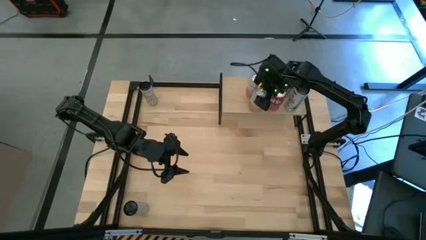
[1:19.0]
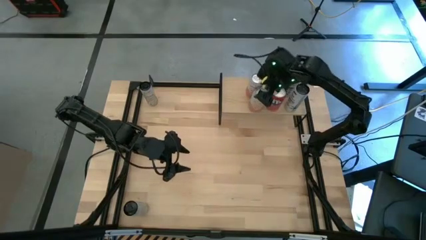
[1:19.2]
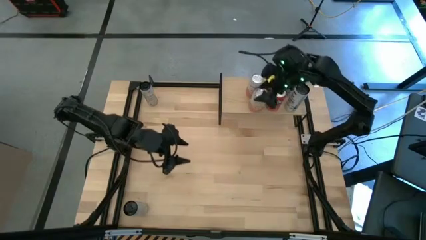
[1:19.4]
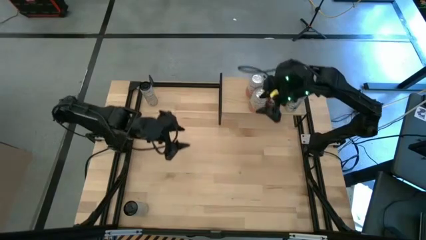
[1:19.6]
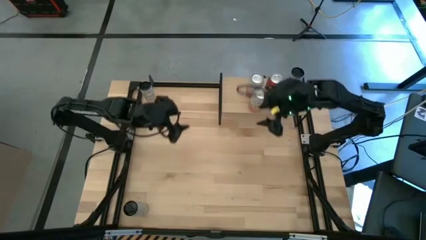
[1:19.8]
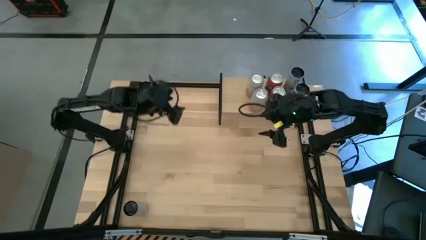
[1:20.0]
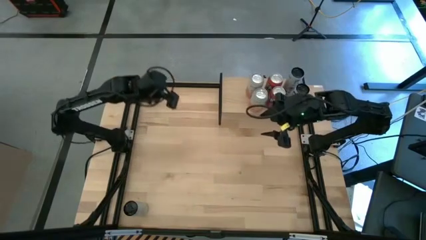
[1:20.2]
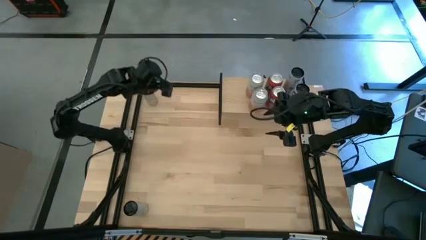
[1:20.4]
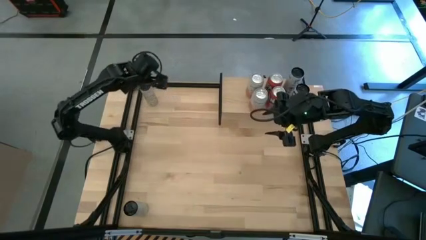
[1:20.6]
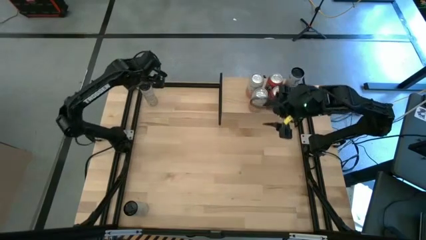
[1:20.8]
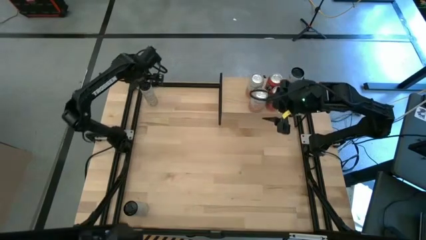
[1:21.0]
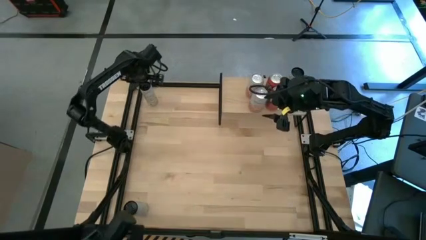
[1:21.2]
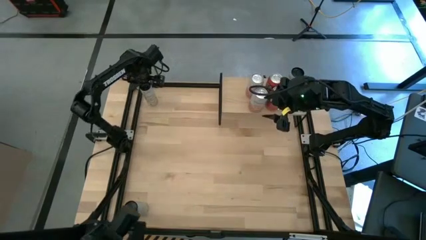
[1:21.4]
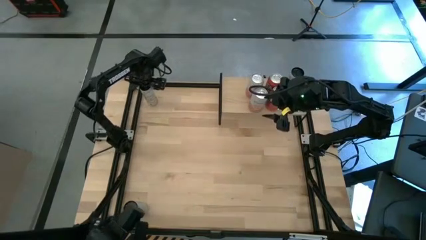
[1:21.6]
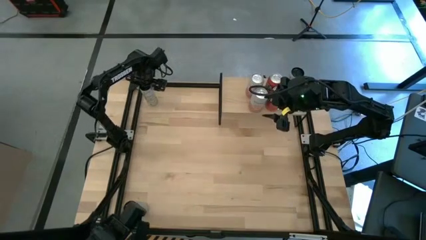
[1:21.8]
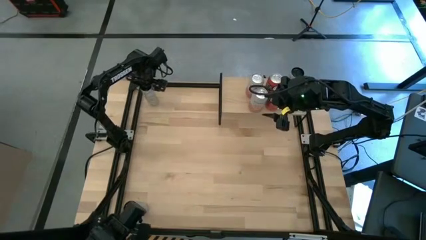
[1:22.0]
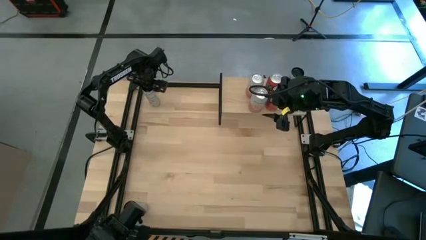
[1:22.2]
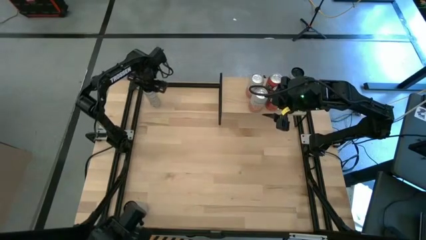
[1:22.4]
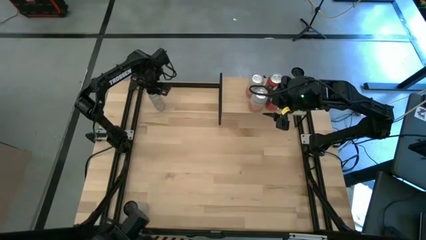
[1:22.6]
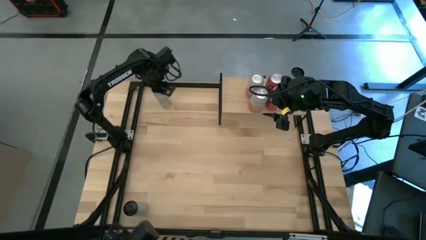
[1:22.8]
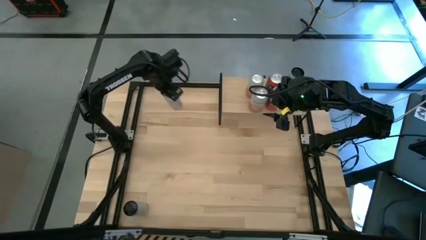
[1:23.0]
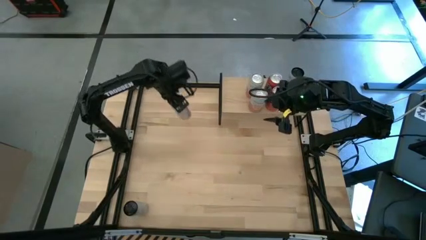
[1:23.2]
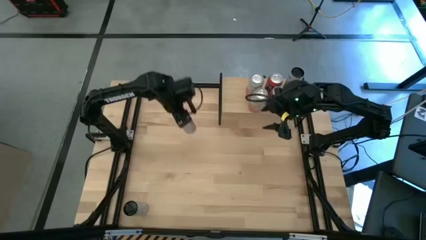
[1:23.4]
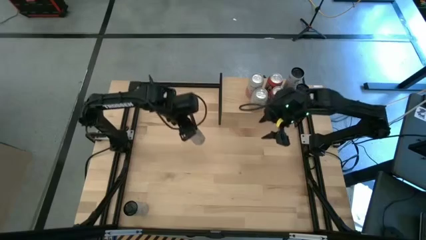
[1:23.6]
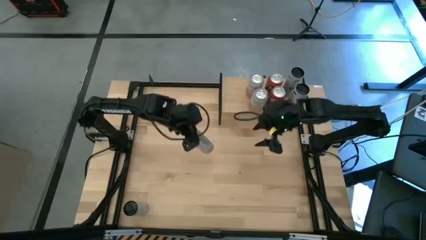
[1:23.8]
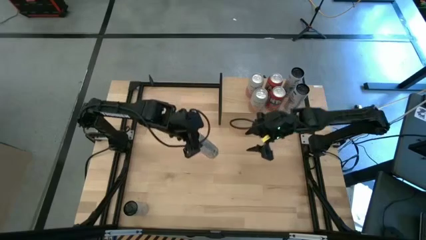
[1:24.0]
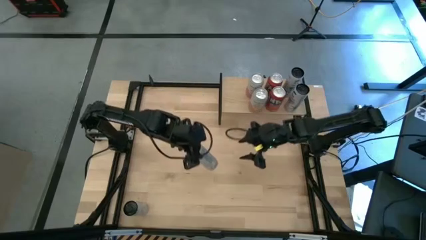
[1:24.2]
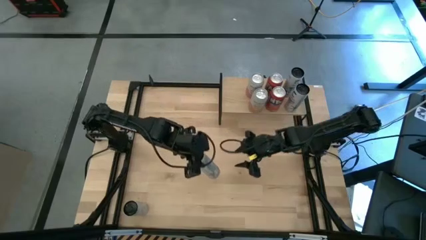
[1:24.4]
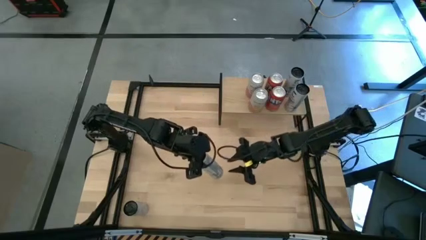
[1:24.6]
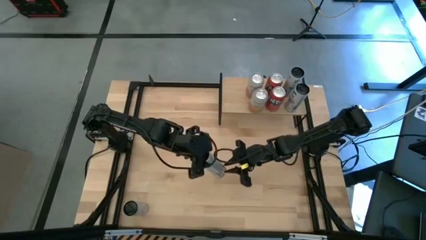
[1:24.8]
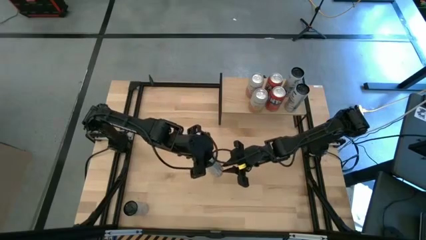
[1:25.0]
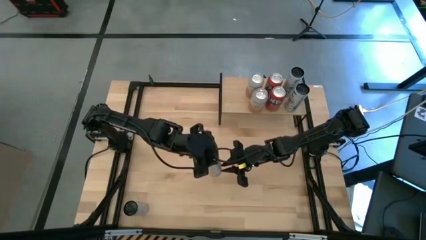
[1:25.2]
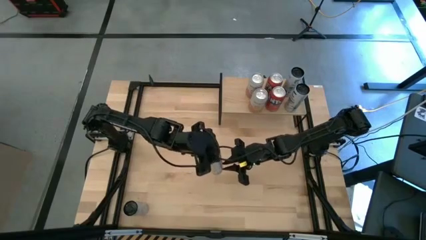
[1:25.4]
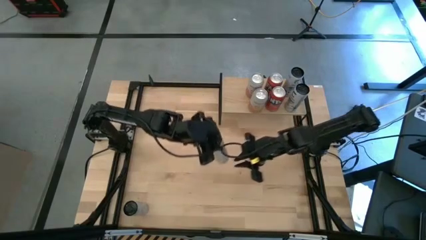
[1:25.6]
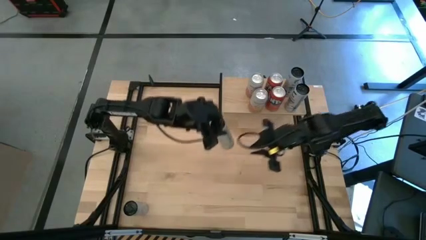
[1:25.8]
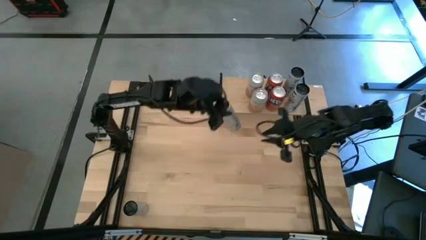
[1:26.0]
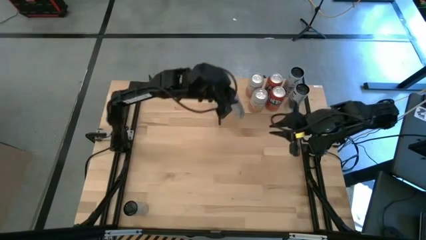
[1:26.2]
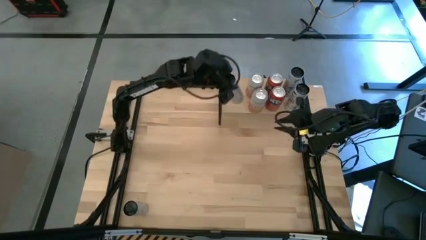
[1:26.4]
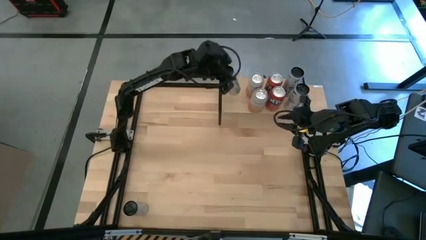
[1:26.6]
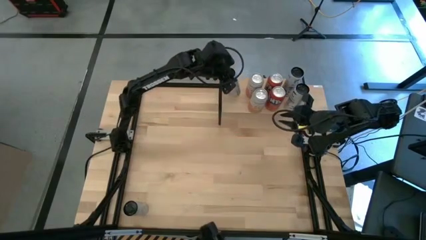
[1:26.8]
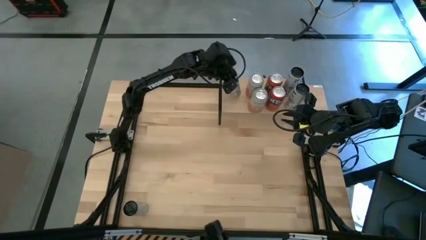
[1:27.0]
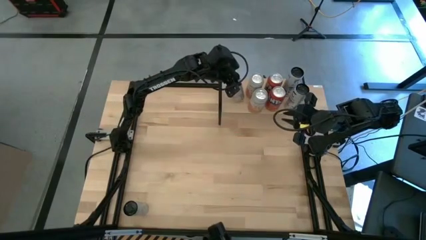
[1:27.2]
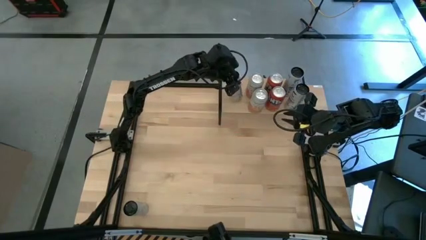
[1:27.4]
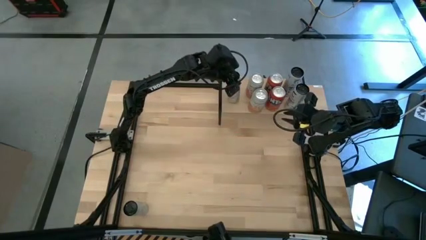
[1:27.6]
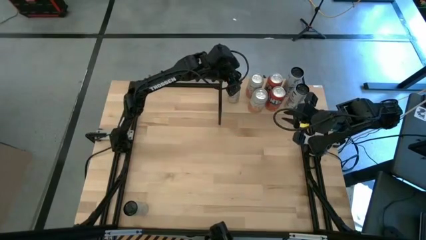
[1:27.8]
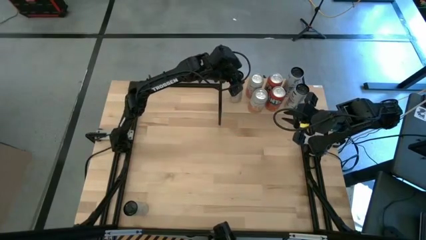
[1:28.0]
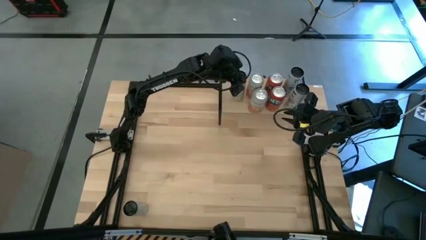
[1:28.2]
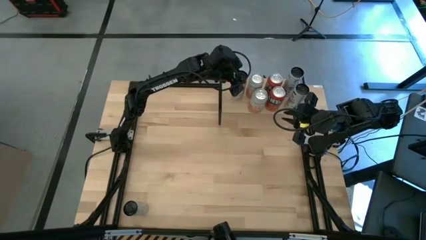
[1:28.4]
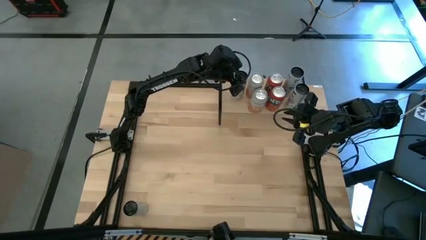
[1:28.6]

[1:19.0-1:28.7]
Task: Place canned beverage on shelf
Put the top white yellow soda can on the shelf

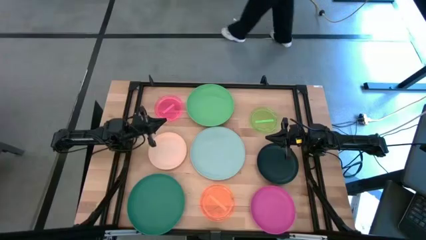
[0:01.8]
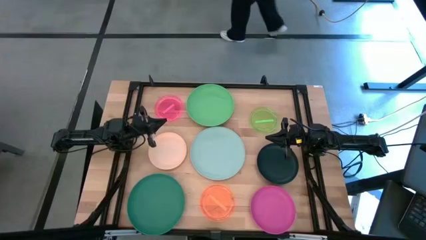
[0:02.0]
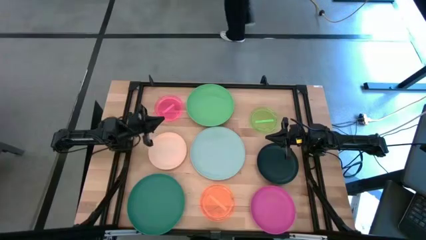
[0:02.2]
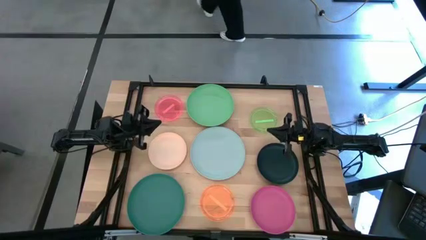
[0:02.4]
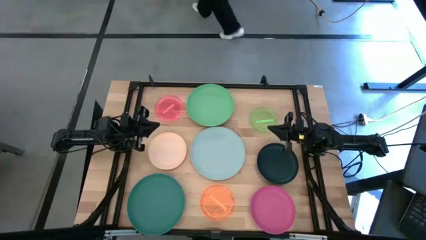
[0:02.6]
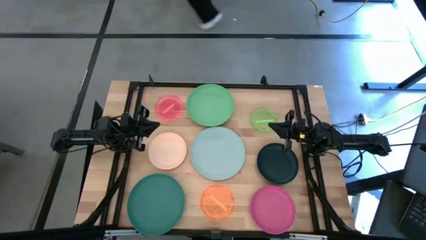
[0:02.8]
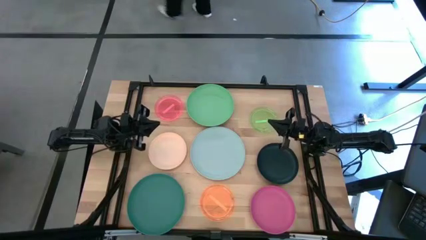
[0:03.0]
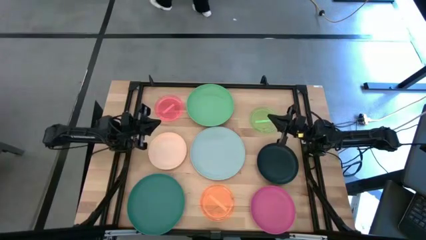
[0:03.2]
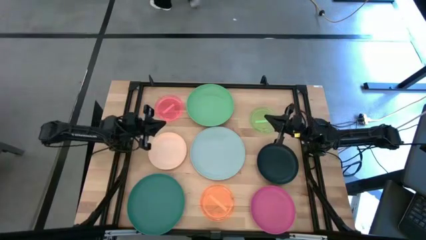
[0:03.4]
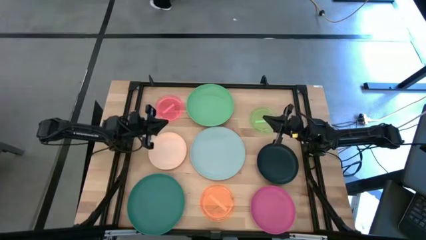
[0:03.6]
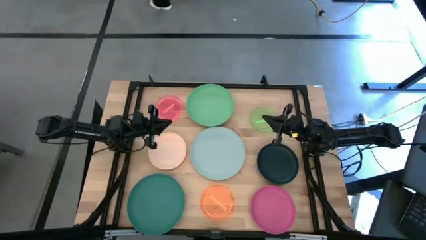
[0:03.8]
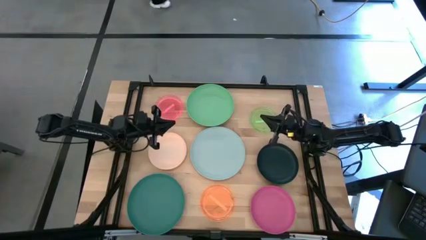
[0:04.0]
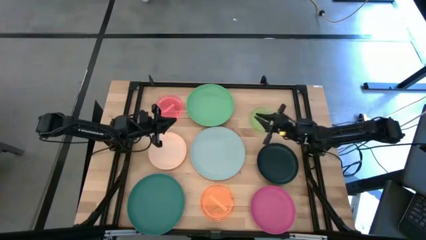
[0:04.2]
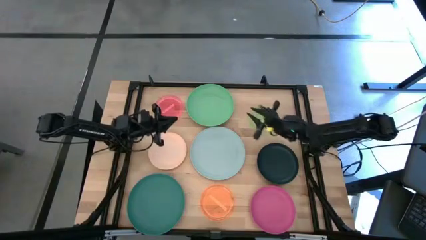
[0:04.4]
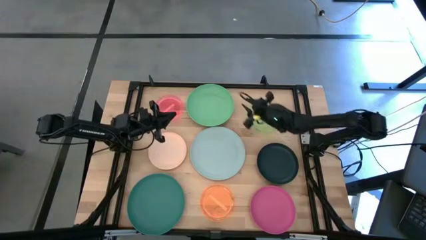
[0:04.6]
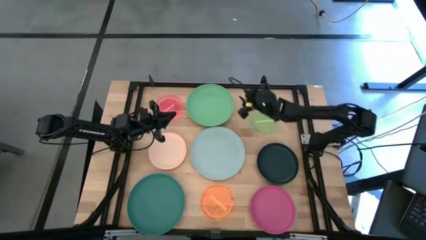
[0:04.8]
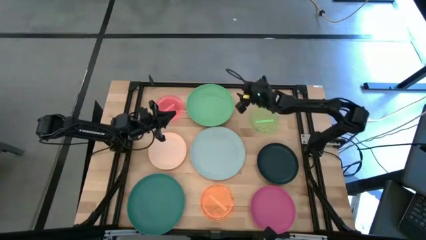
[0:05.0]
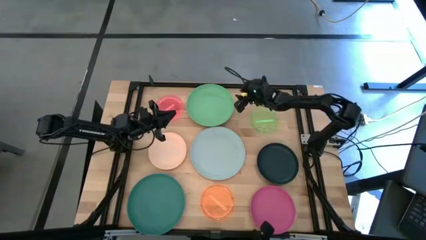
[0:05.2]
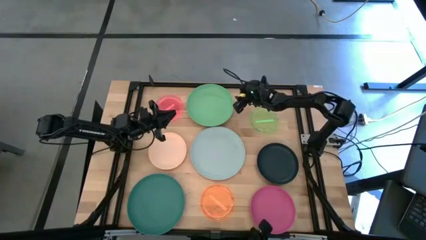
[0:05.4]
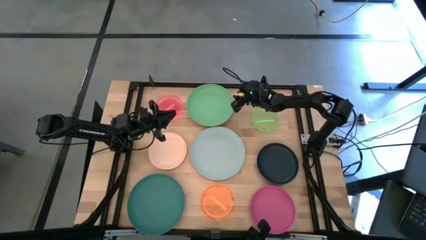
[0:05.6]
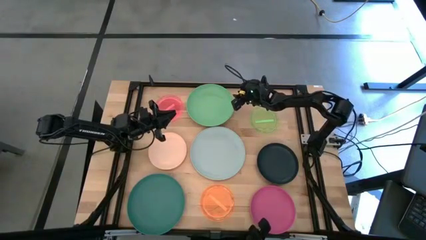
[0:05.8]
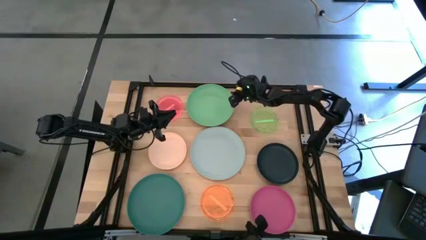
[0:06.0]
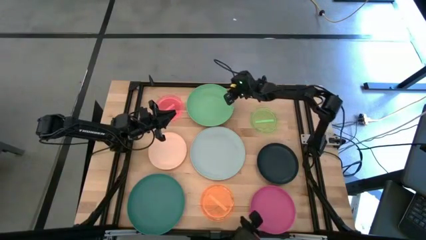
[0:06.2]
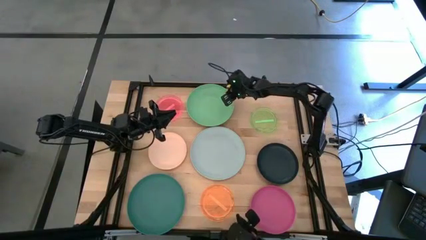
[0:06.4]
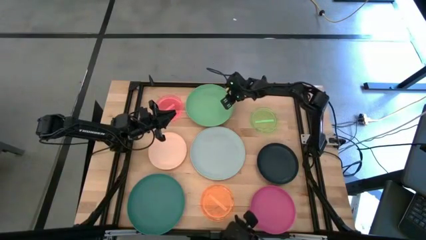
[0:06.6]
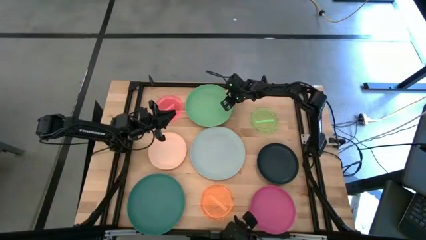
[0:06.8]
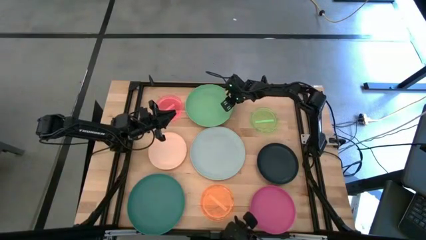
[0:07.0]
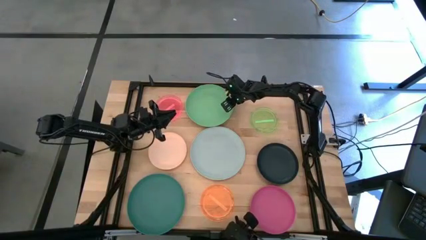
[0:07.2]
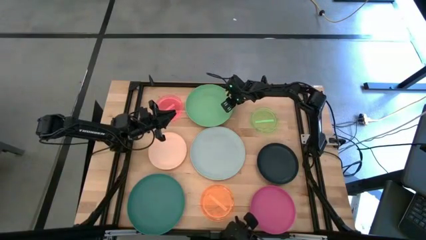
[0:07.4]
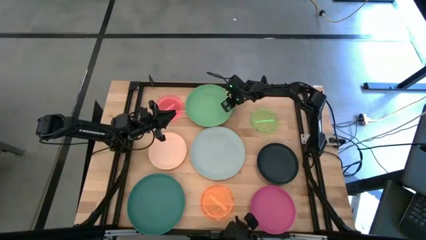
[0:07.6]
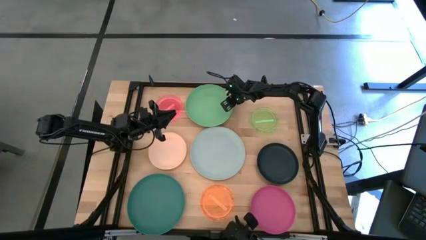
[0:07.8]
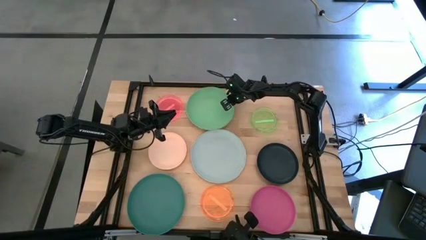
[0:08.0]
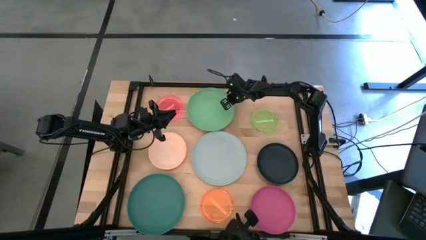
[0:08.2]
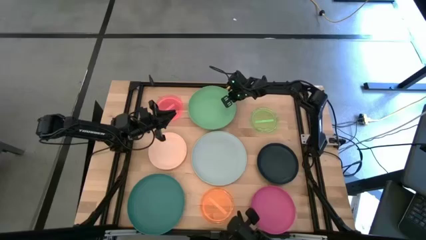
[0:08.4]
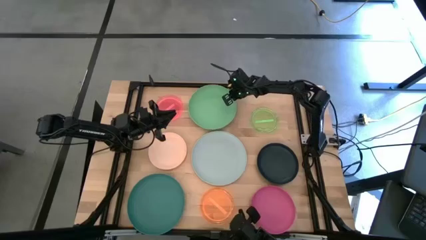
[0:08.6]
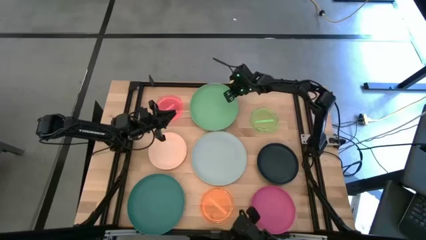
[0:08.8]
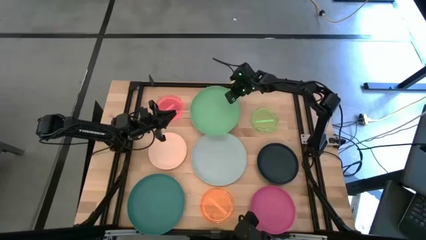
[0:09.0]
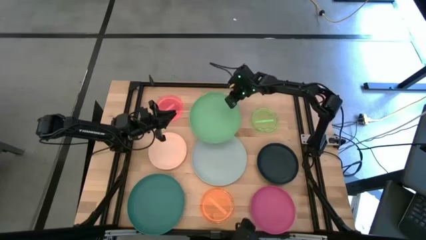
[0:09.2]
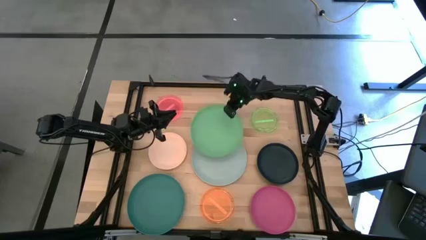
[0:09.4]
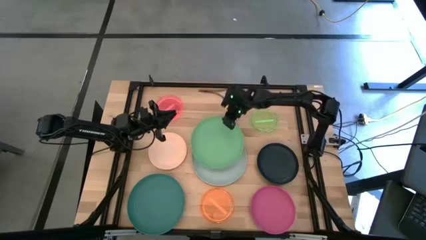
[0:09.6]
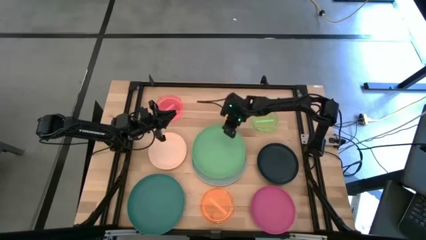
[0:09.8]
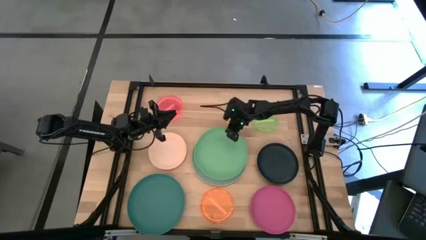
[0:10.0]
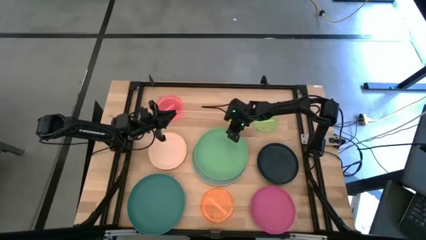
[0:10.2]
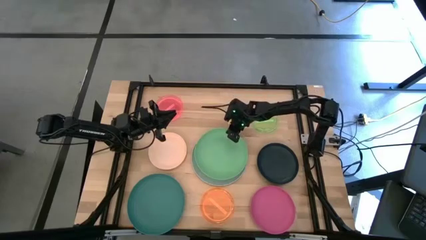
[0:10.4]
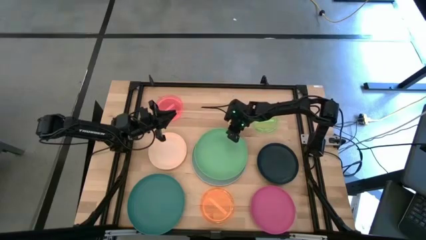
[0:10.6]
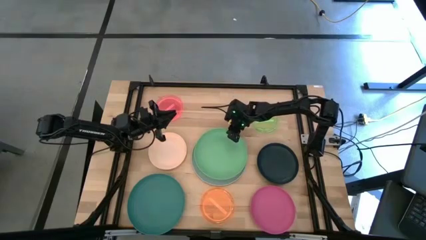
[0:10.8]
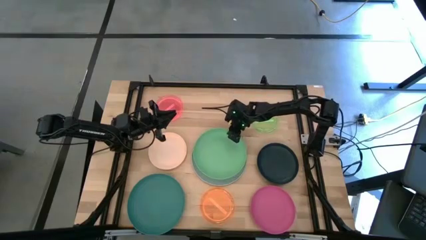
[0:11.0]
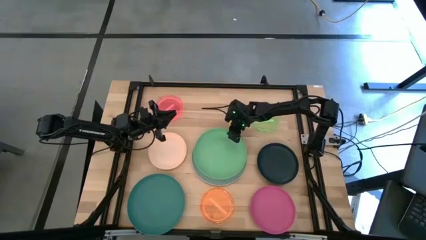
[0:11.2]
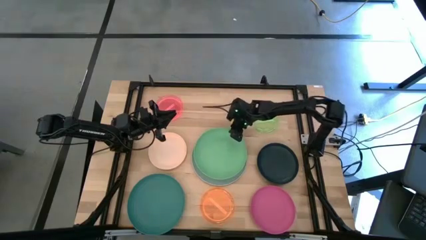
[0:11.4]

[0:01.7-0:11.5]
Task: Stack plastic plates
Stack the green plate on top of the gray plate
